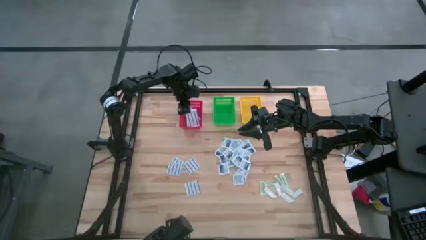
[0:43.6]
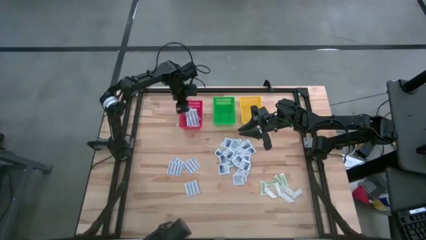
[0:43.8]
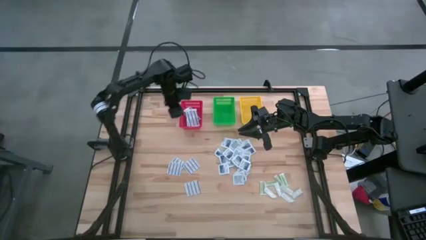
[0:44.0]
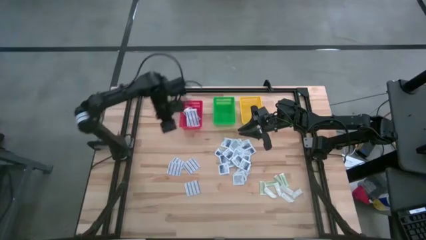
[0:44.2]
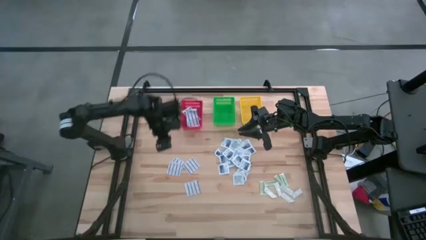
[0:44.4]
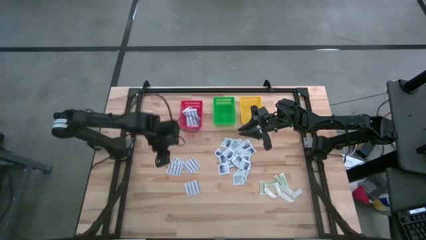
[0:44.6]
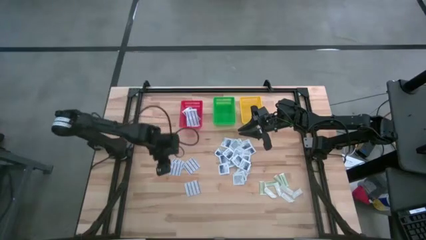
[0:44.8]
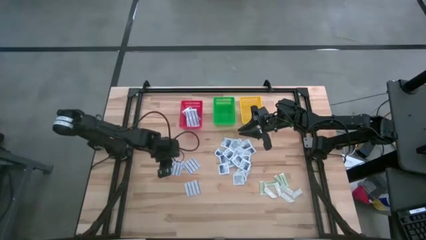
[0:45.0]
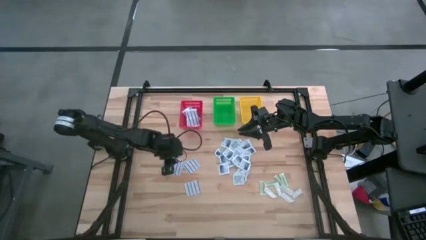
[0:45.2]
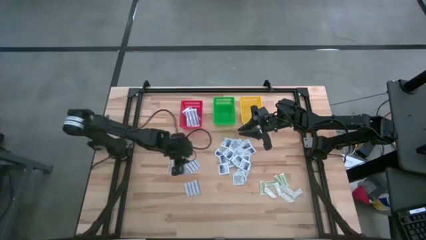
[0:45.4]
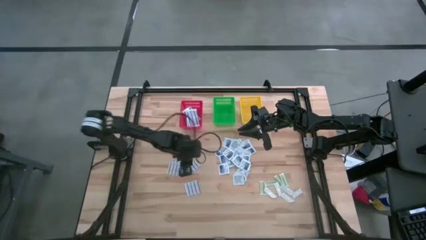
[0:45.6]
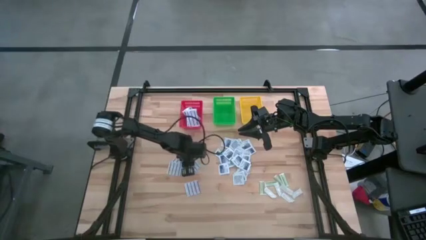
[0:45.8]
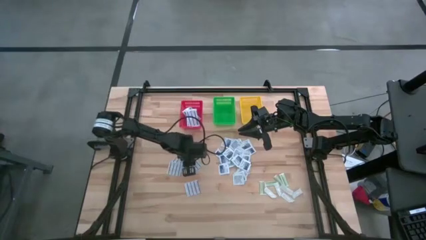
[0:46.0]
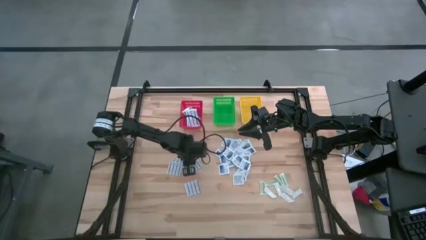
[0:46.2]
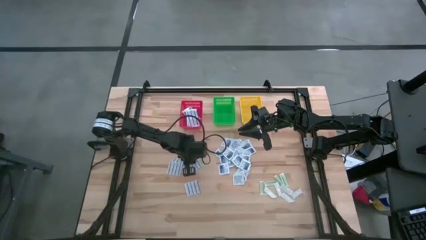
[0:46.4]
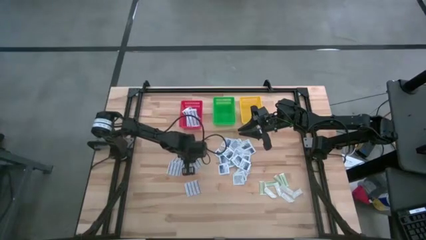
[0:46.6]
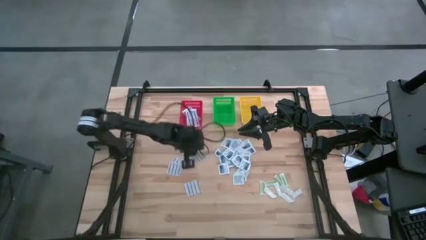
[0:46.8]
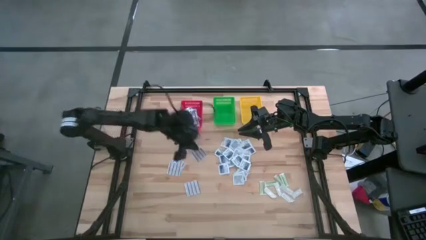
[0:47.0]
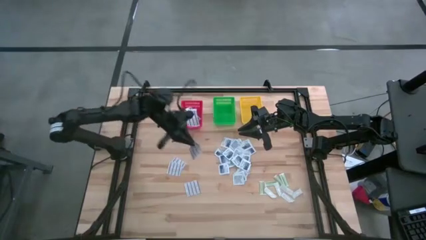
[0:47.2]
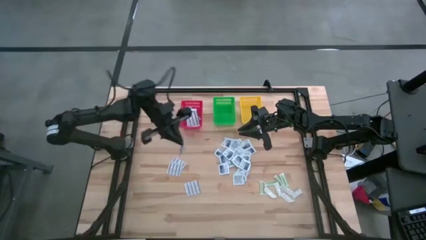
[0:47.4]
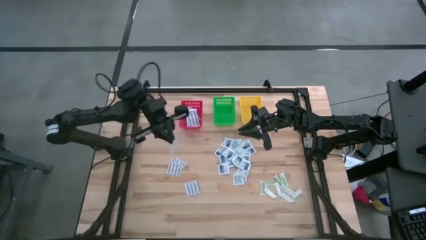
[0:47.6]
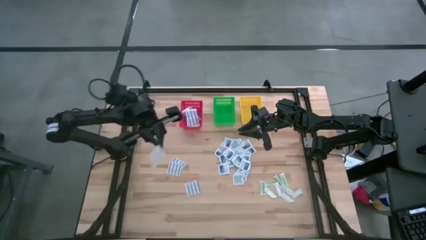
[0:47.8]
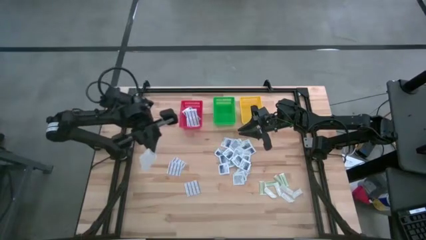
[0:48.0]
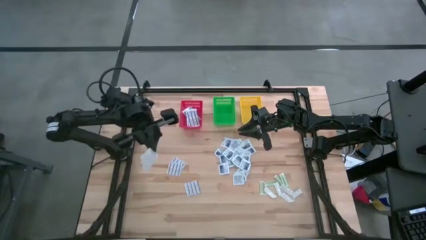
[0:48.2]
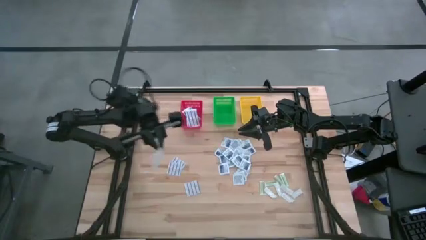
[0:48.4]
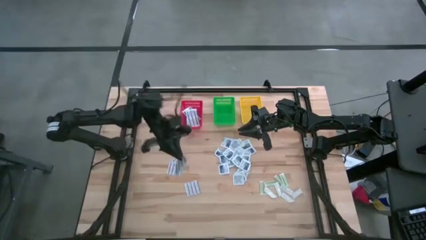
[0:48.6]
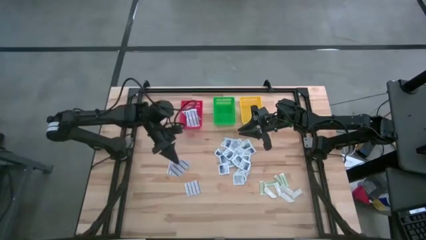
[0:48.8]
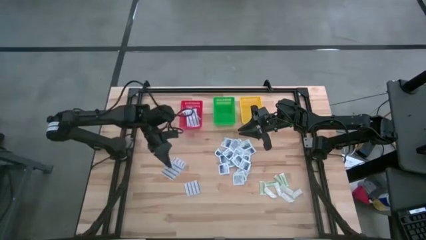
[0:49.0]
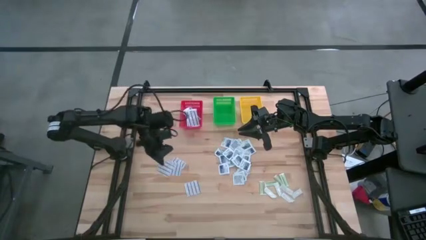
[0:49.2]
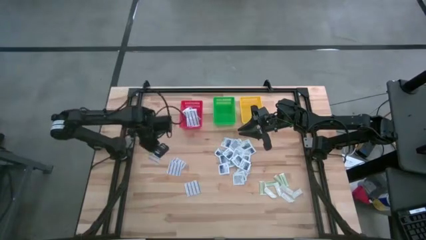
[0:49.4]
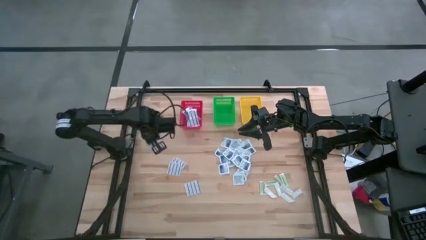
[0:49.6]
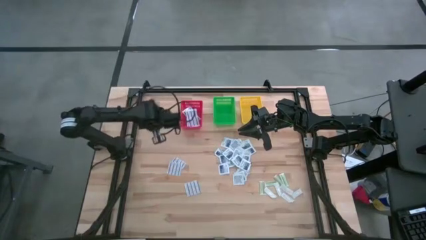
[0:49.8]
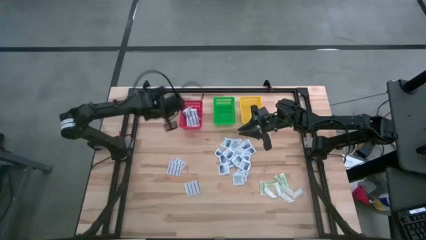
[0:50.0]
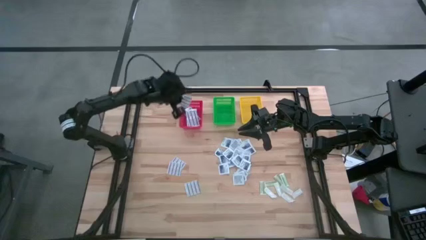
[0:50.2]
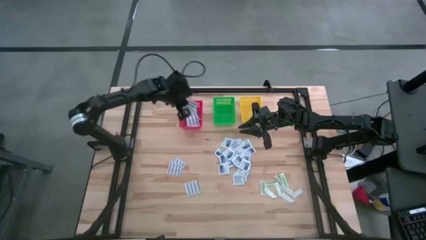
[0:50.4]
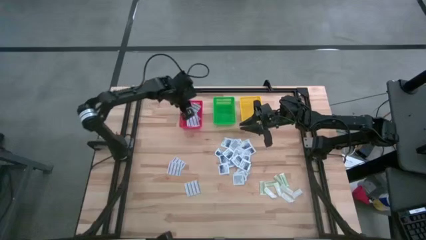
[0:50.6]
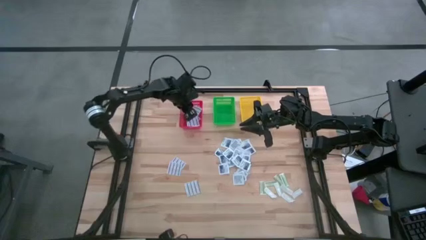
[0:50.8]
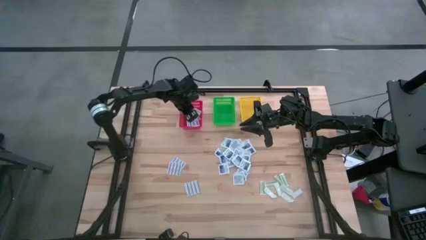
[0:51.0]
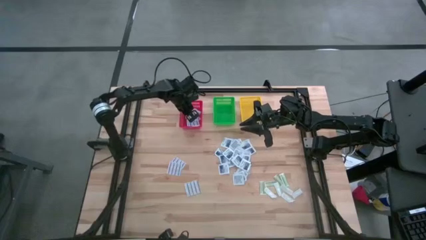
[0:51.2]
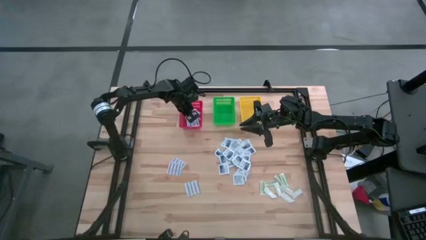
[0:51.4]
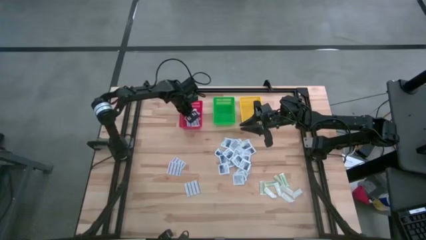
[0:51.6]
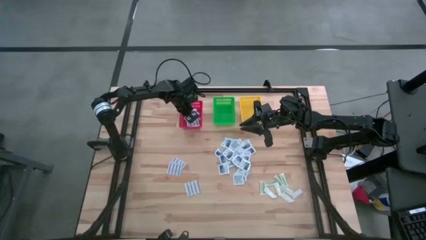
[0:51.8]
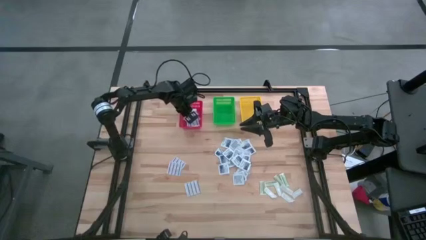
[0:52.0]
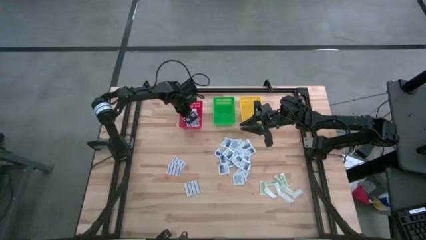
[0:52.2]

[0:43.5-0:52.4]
Task: Pick & Place First Aid Supplies
Put the blue bandage into the red basket

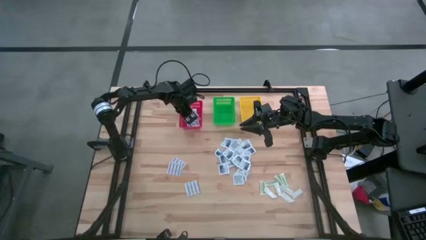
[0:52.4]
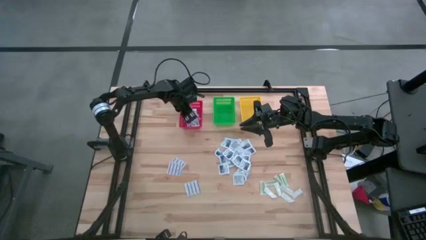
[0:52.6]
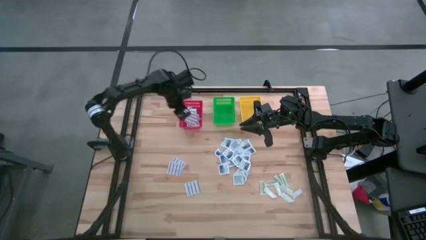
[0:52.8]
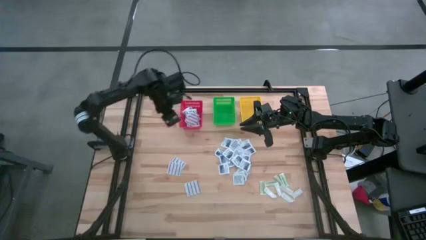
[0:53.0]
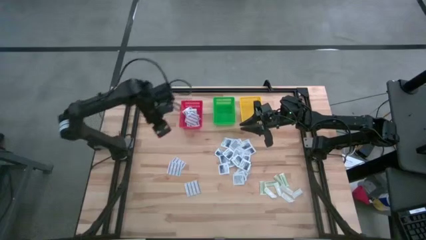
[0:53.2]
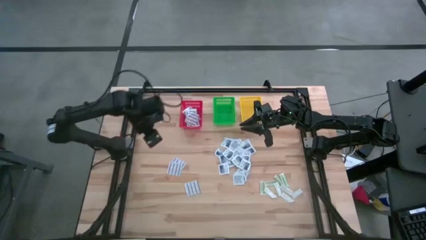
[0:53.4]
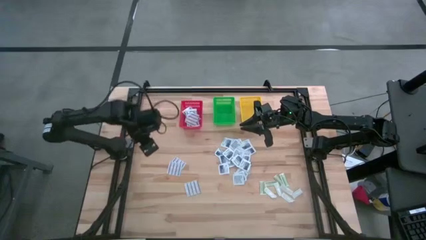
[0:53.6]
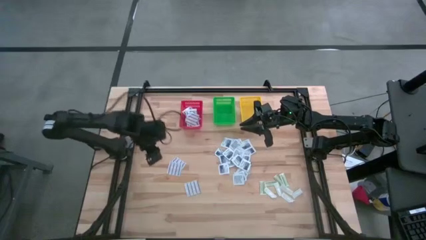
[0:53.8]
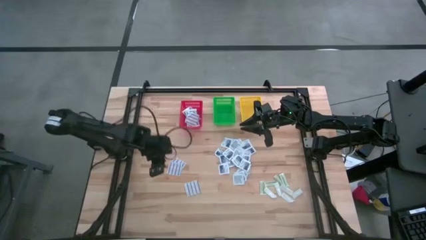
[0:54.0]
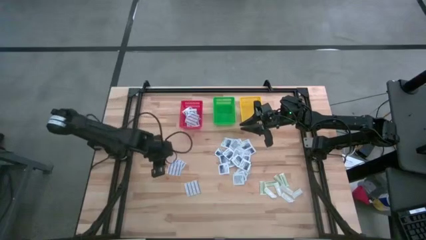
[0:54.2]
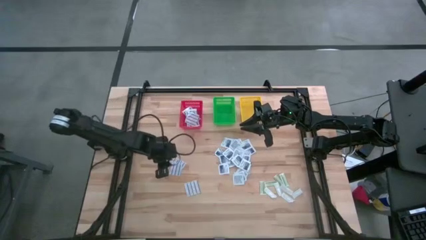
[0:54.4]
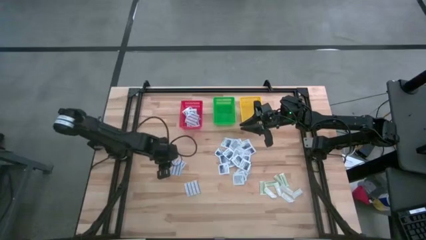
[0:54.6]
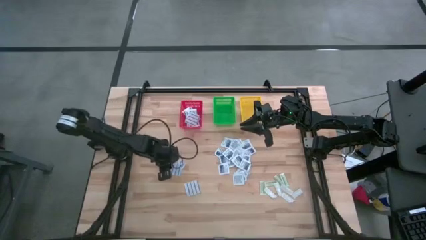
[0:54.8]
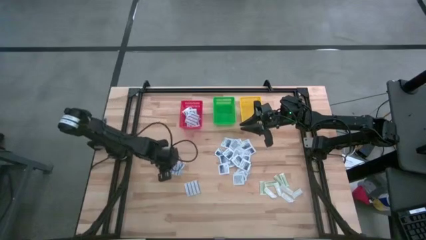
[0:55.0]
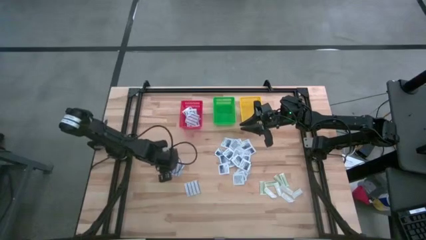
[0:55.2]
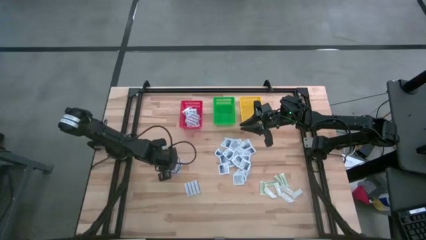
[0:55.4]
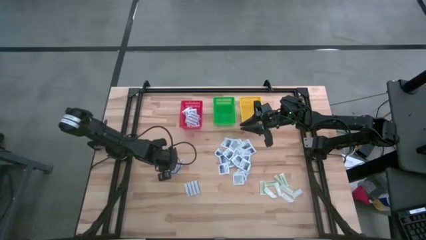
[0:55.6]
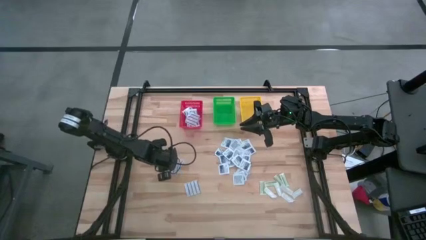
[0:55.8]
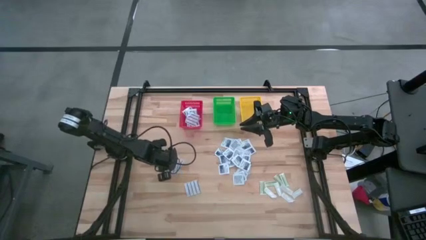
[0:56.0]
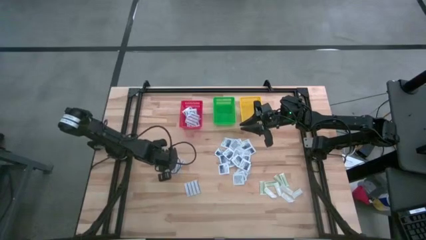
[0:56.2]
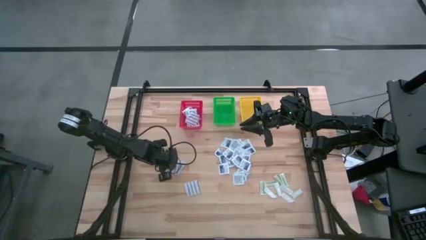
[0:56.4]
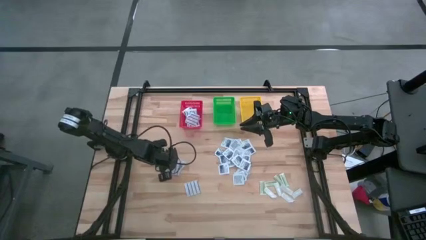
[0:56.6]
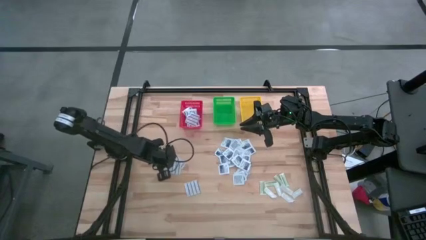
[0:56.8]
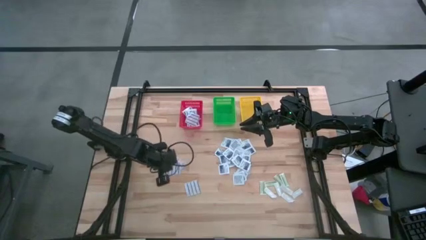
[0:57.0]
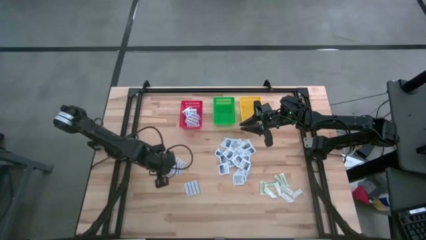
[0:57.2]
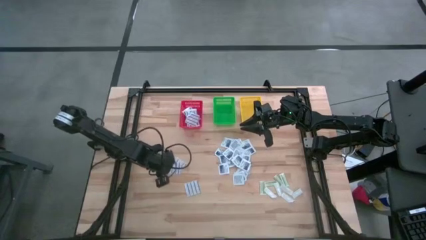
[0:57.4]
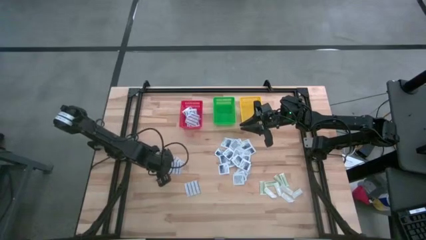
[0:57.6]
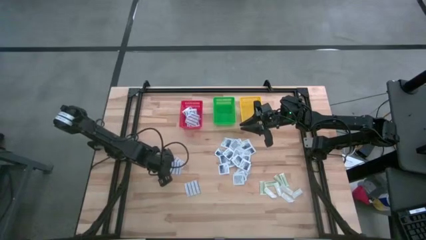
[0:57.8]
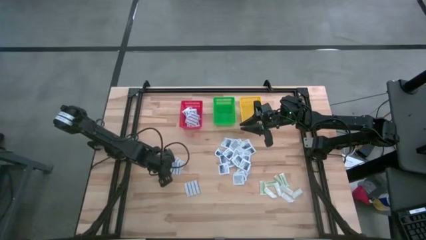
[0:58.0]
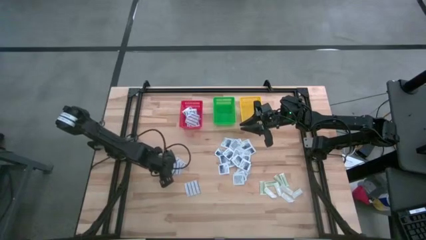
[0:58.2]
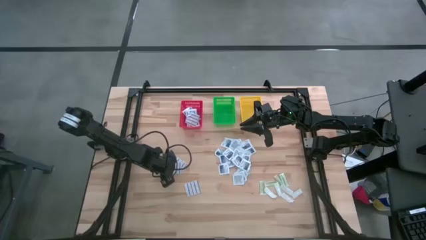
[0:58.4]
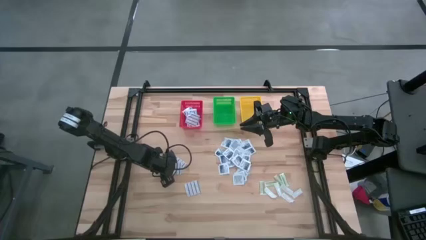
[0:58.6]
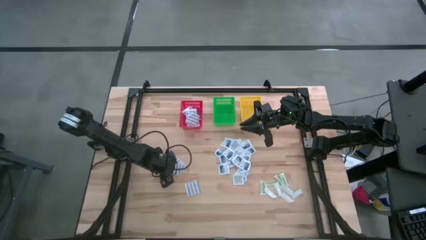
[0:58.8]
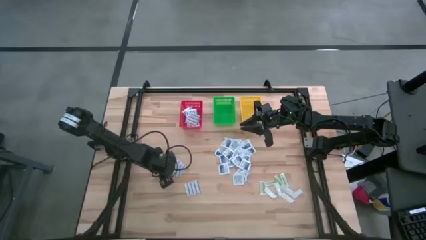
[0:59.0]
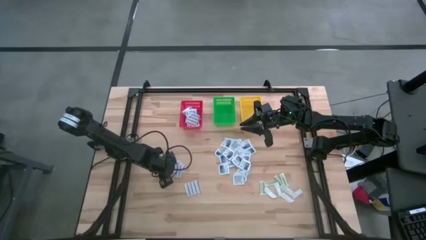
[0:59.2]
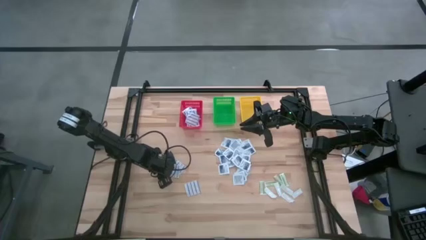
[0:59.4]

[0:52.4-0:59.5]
Put the blue bandage into the red basket
